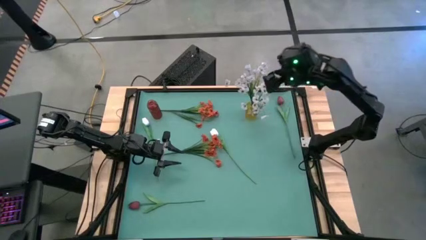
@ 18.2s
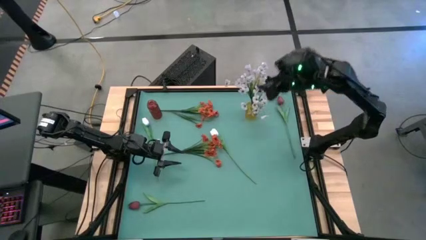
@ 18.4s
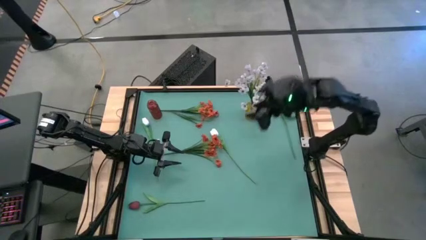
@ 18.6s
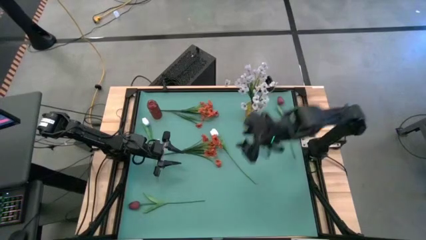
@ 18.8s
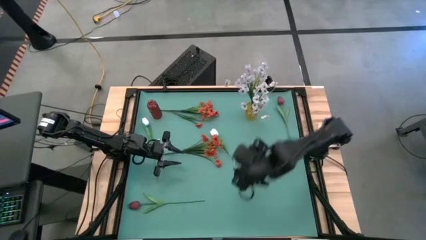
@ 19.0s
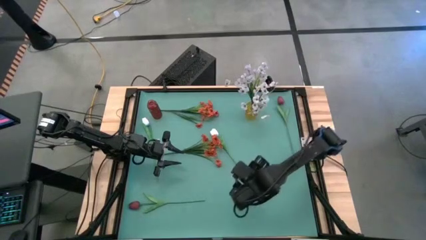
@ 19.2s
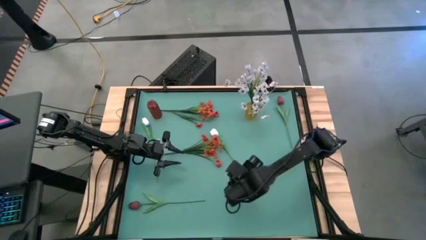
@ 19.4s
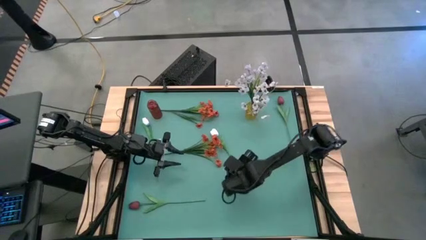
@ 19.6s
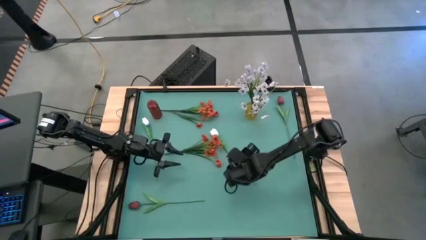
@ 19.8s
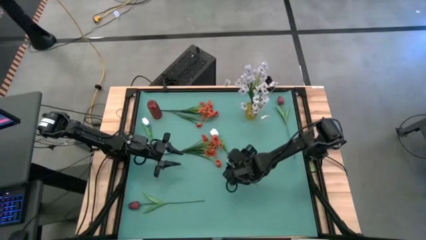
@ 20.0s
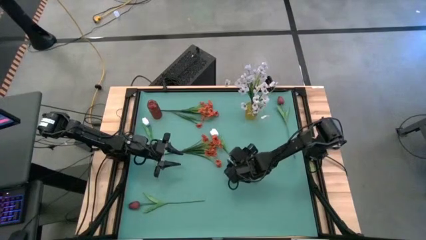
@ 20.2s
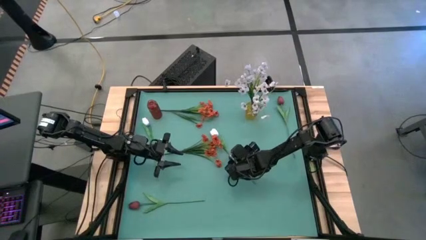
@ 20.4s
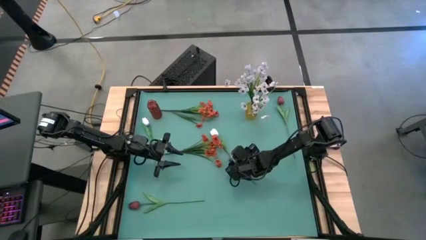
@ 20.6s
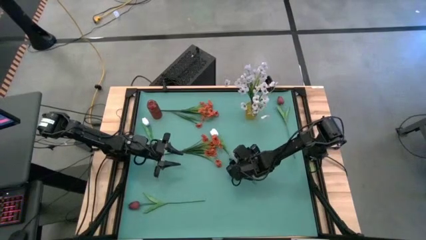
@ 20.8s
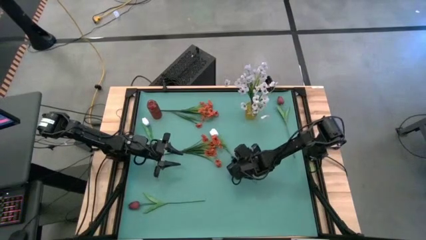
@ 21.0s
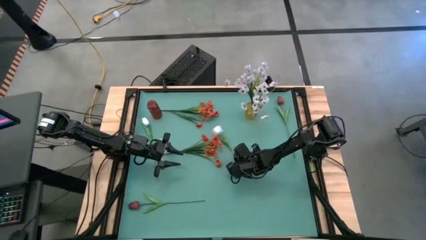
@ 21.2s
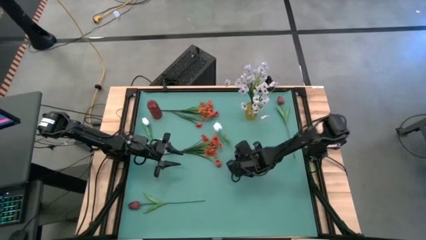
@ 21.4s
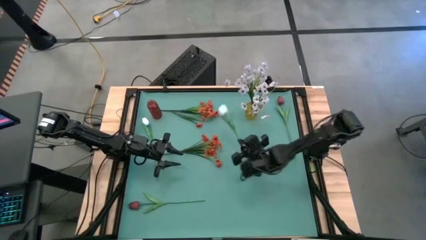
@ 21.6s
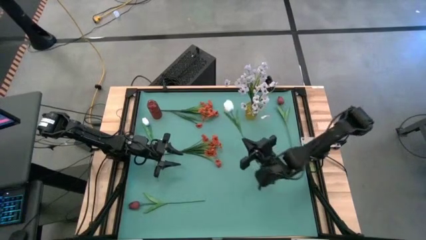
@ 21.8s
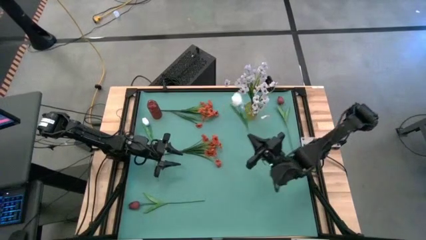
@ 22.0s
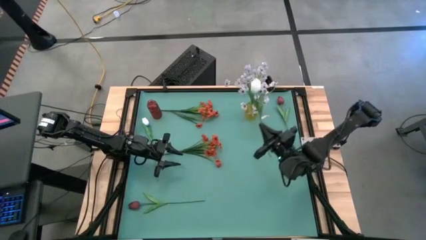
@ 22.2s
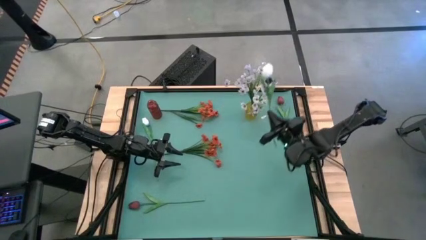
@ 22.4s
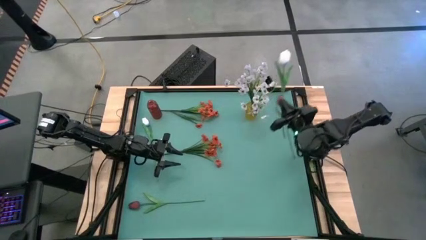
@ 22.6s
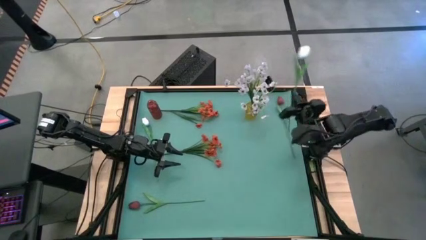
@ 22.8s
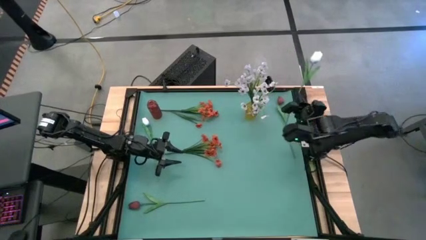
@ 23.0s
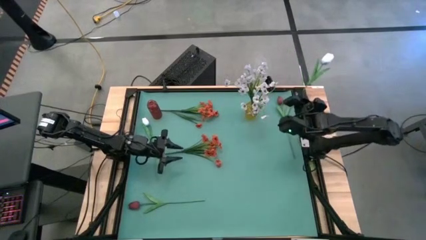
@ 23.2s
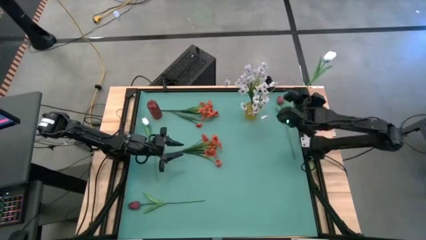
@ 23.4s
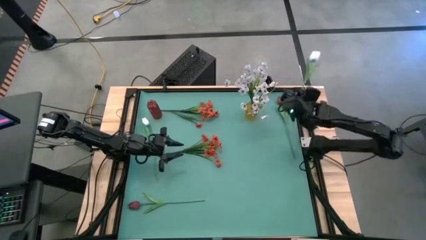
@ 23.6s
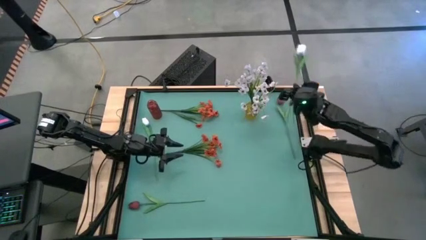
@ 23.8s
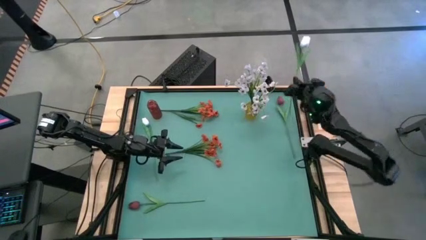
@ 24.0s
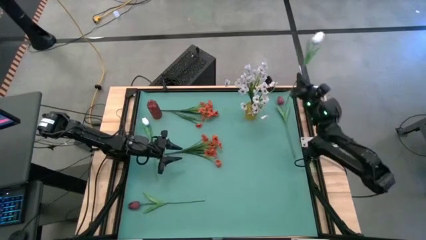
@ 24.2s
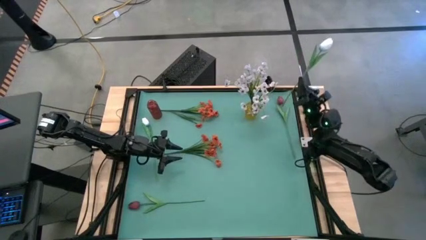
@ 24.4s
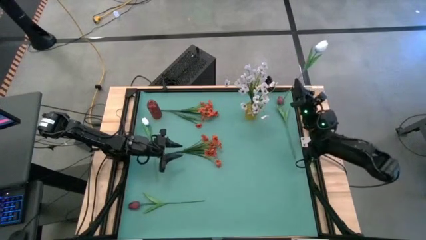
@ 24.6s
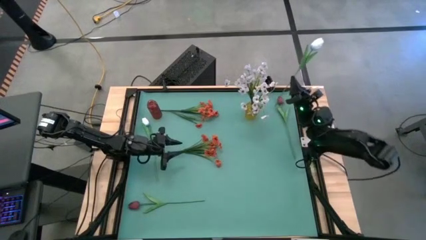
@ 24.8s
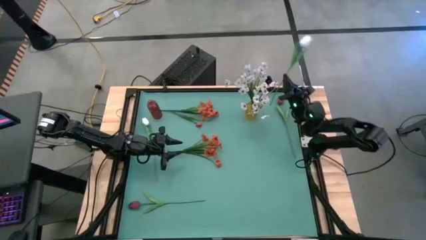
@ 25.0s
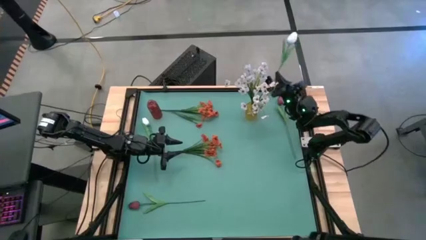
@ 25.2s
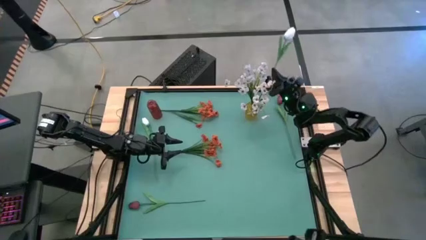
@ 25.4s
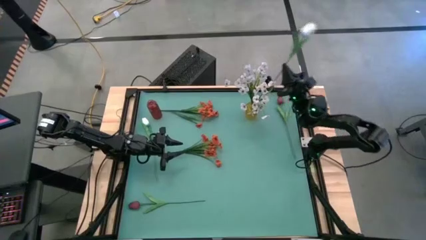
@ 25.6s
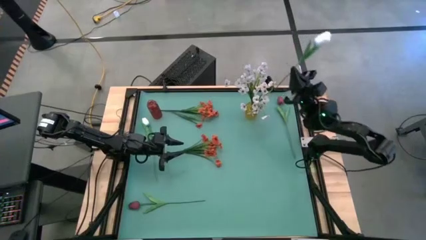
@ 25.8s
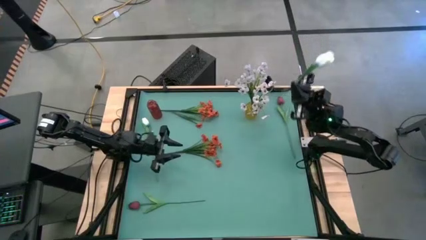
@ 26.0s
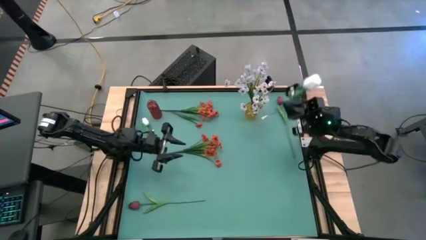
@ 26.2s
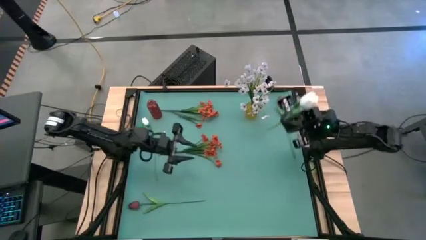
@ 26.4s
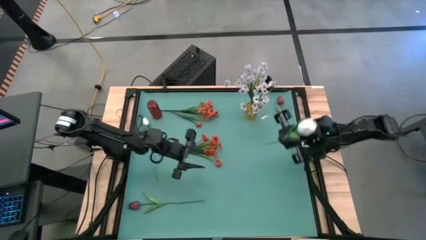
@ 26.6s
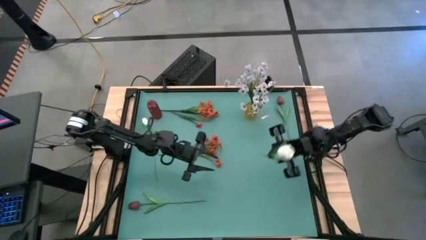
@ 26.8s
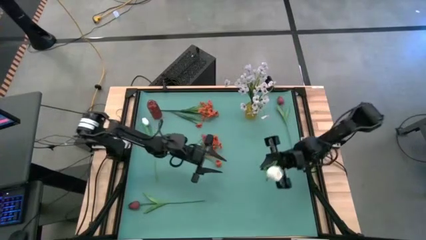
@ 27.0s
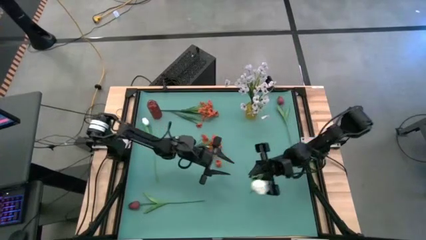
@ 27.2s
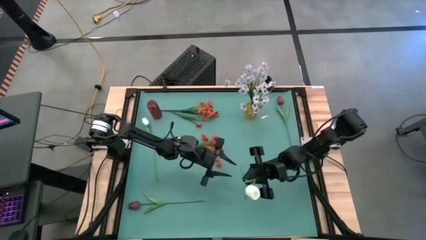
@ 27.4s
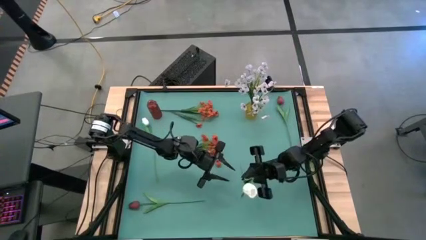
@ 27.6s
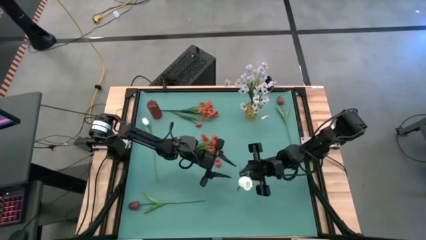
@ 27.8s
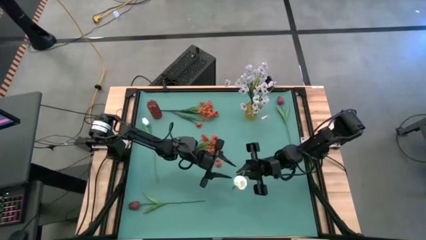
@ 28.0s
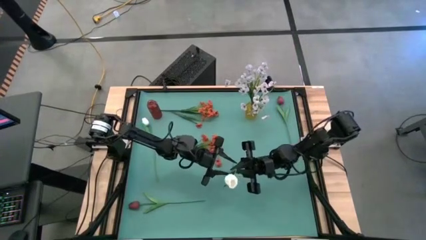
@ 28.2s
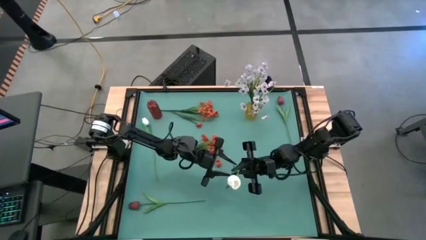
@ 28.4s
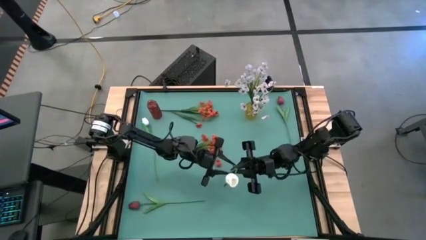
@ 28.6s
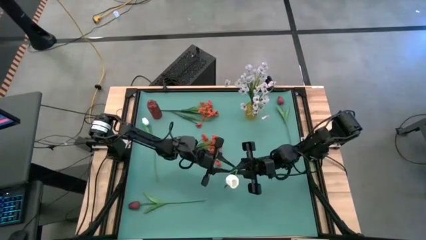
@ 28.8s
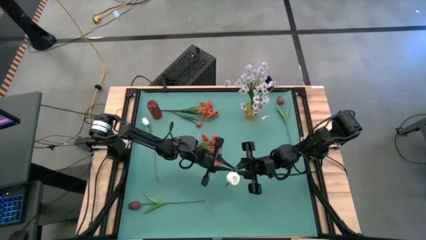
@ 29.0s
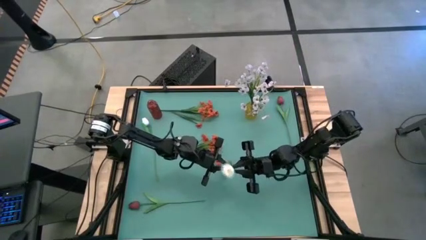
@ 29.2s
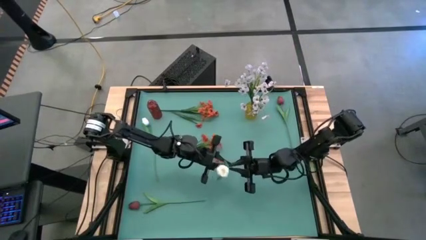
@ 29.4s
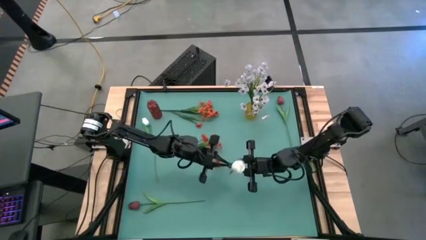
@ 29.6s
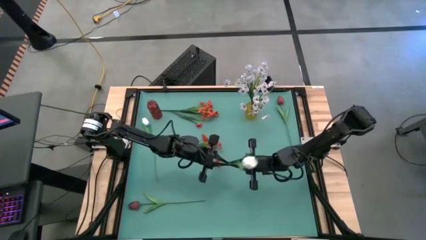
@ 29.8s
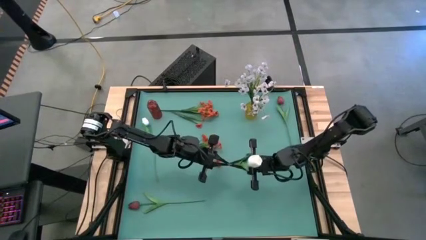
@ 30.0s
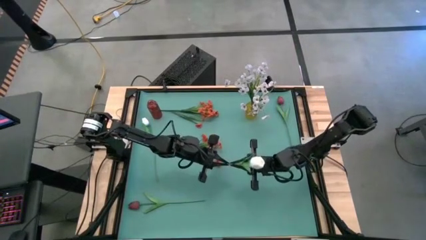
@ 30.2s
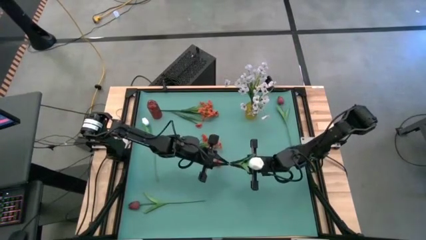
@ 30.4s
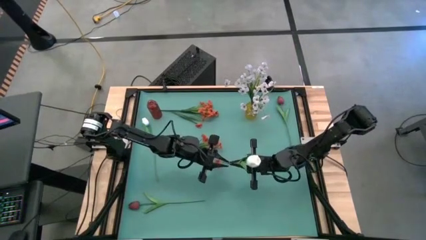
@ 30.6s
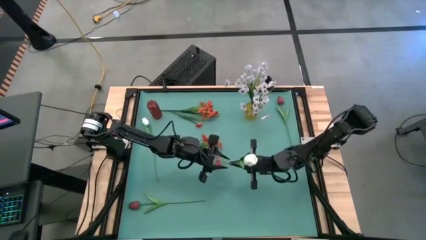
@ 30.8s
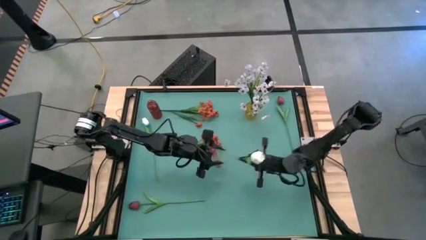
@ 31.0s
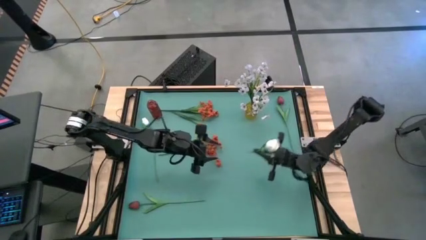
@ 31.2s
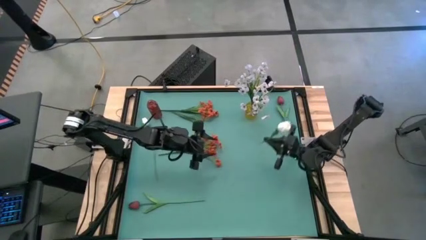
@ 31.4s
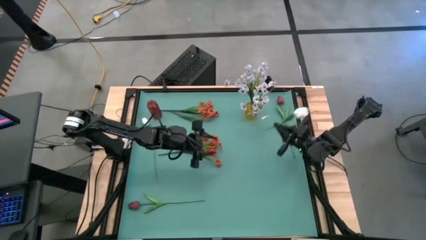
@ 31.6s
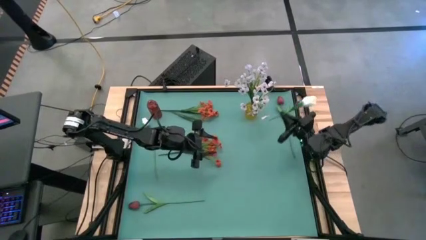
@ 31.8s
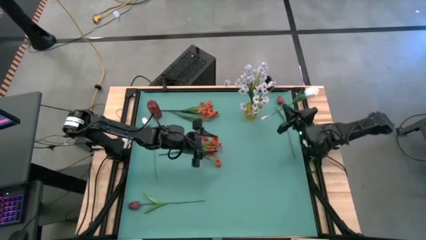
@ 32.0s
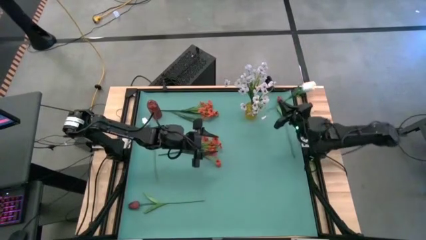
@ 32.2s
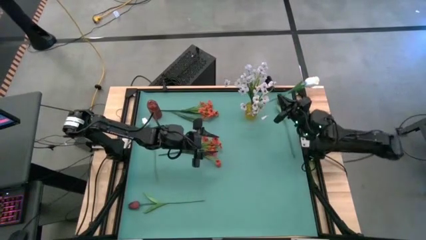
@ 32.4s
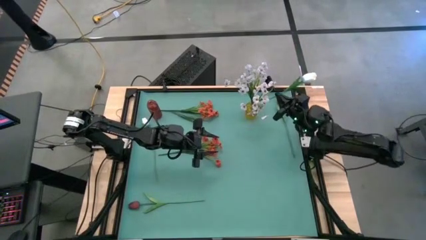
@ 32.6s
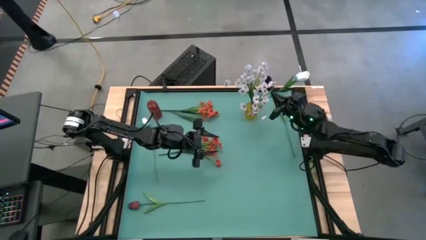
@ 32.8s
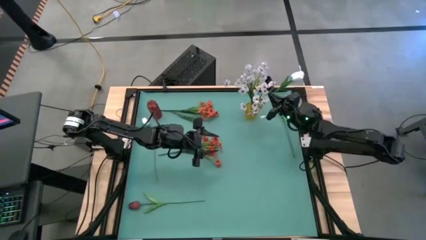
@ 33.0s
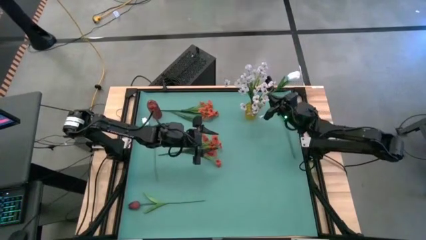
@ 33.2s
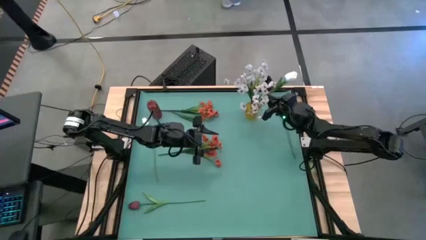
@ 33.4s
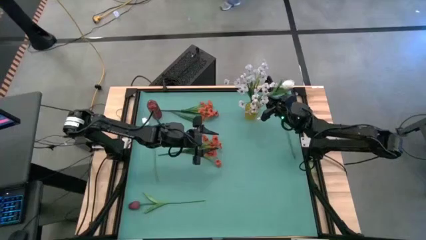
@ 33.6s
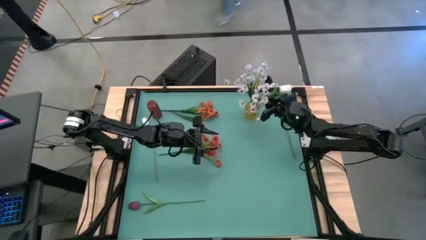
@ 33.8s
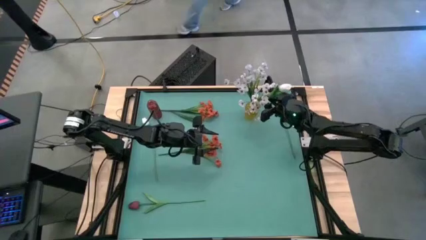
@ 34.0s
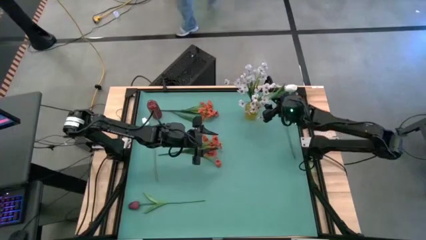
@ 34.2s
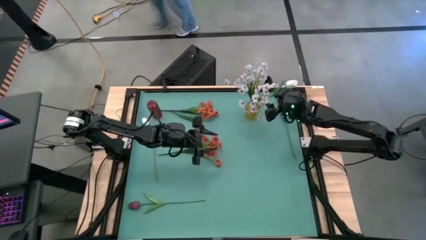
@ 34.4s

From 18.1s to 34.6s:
Task: Sort flowers into vase by color
Put the right white tulip into the yellow vase
